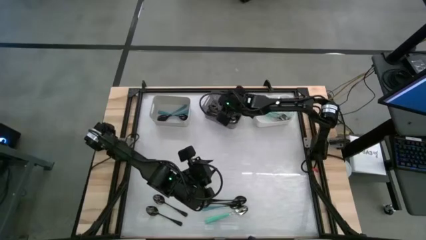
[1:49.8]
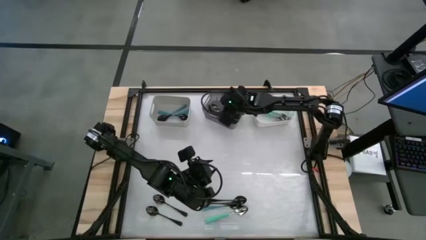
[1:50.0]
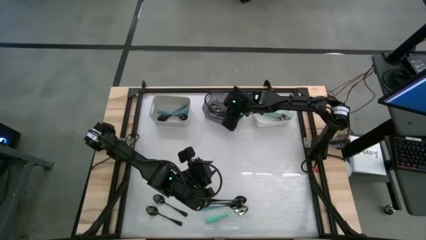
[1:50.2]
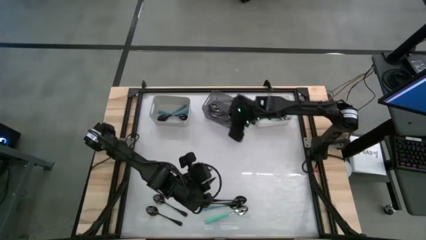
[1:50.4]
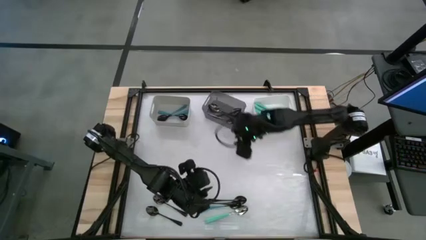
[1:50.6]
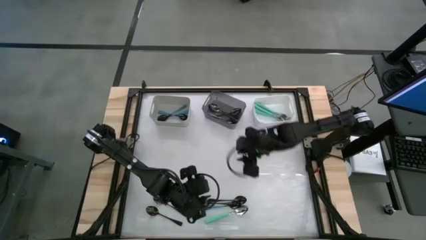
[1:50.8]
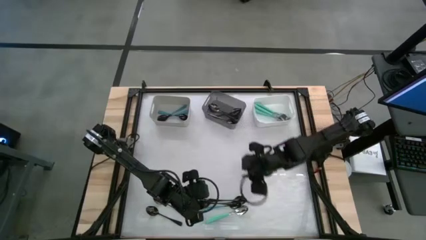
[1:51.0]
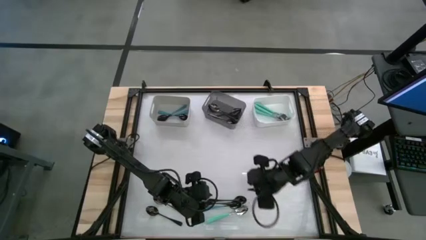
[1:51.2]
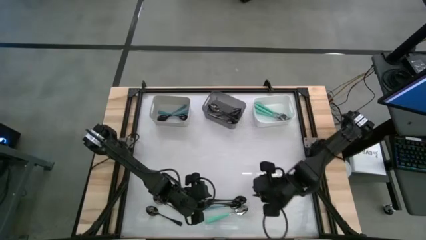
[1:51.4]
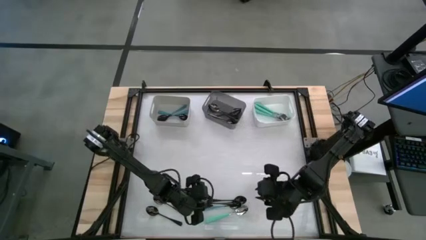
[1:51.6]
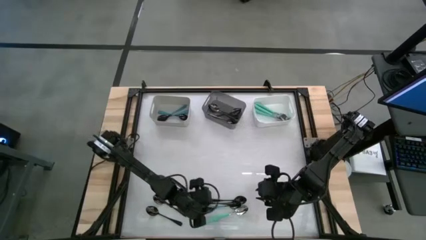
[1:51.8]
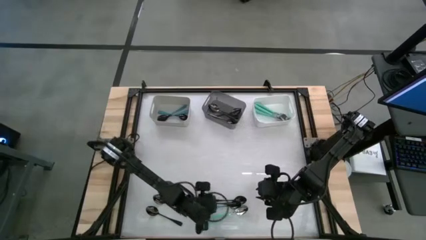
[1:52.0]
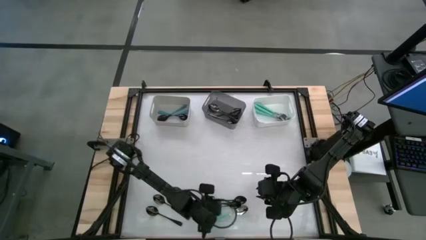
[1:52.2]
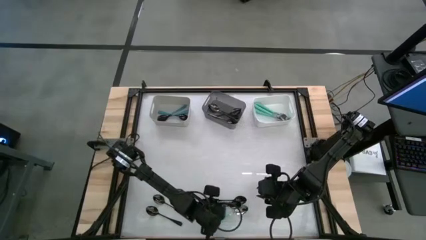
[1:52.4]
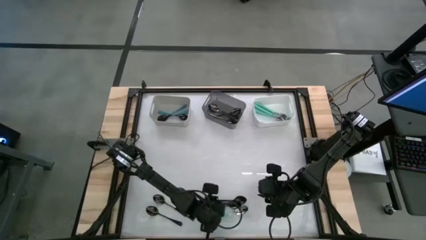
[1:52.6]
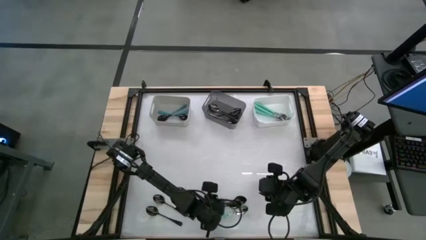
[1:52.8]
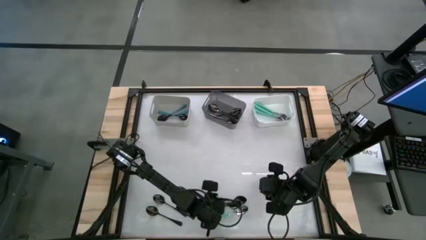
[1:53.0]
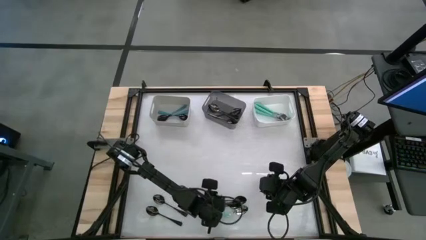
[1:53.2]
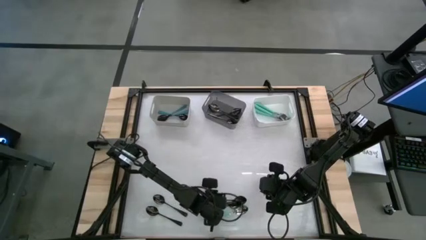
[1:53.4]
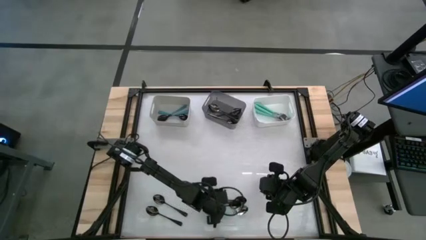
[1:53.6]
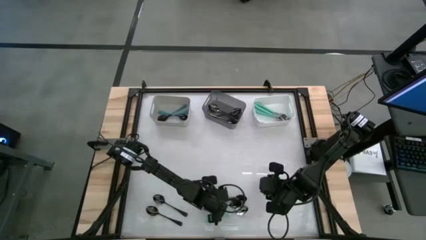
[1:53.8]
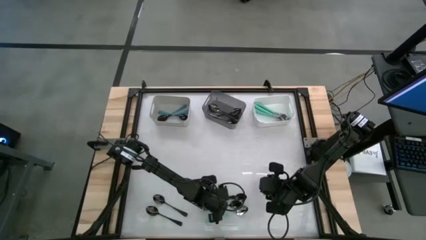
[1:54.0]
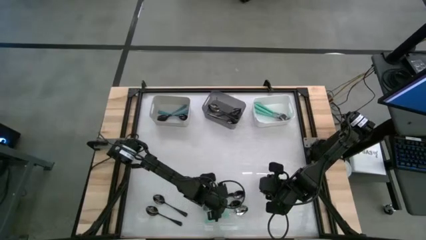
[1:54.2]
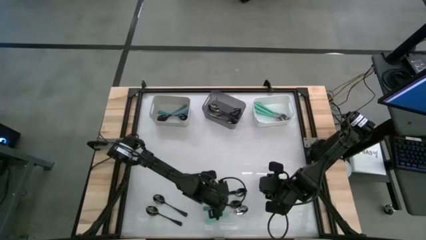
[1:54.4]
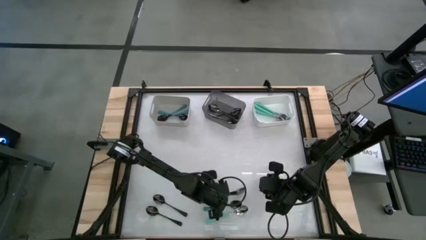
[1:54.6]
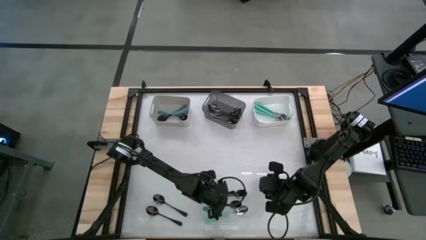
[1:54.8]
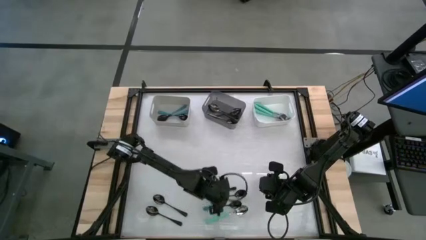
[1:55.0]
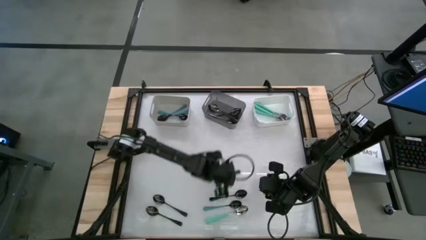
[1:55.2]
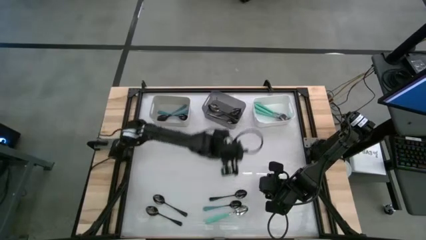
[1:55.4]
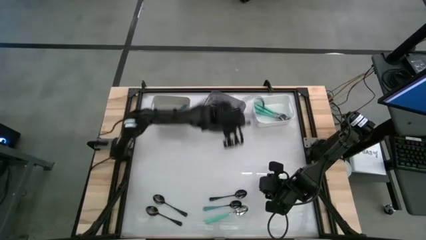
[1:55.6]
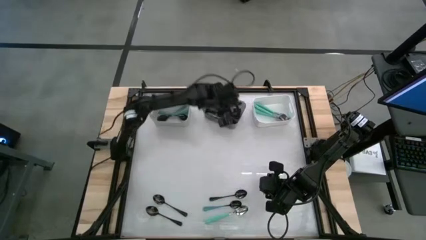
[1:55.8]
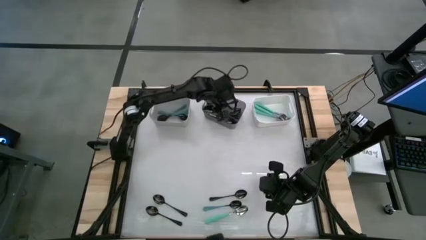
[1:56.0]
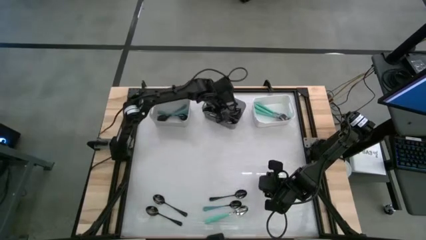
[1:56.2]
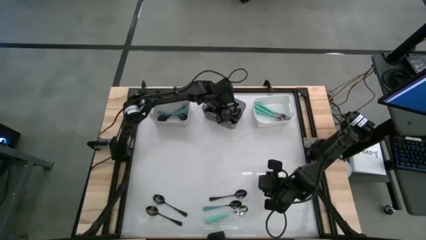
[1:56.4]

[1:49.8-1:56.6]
Task: Sort silverware by color (type)
Put the black spoon into the black bin

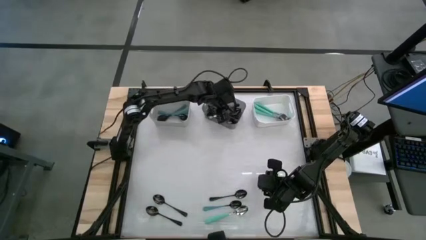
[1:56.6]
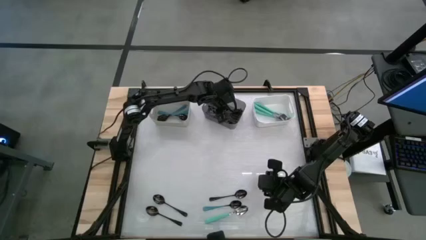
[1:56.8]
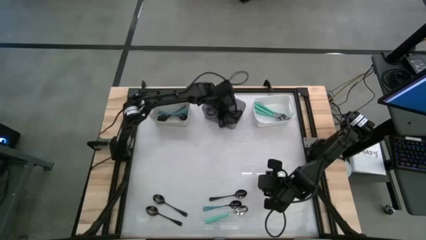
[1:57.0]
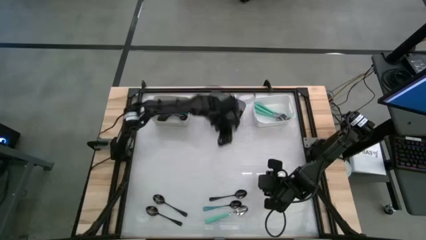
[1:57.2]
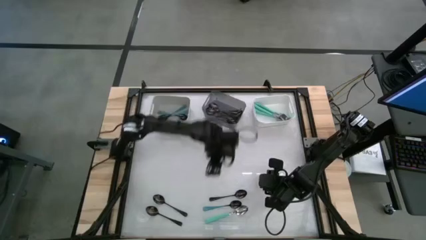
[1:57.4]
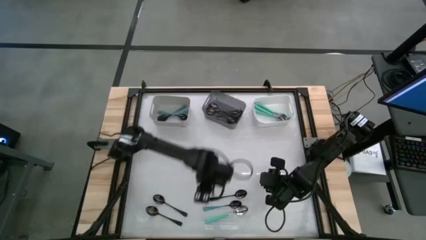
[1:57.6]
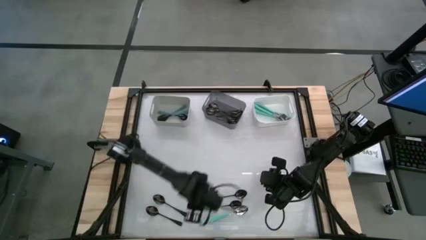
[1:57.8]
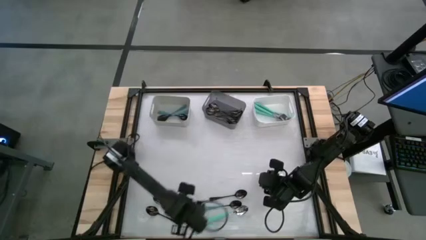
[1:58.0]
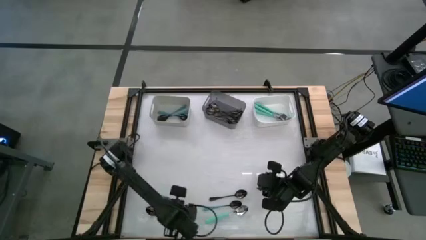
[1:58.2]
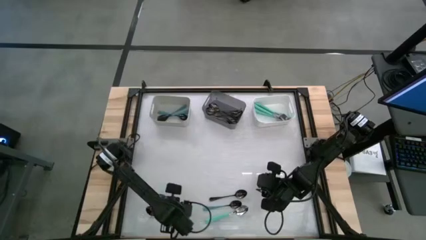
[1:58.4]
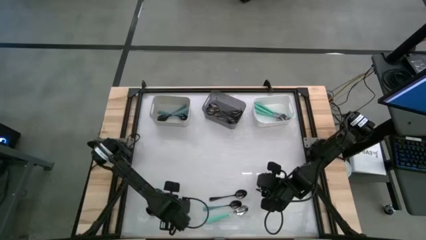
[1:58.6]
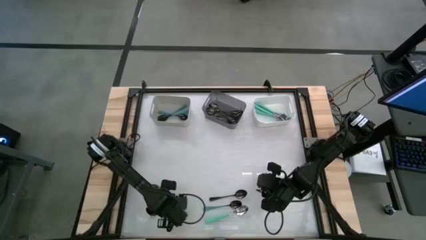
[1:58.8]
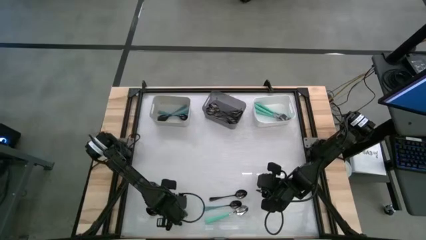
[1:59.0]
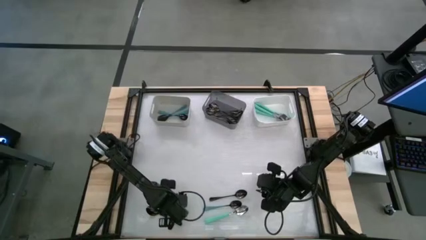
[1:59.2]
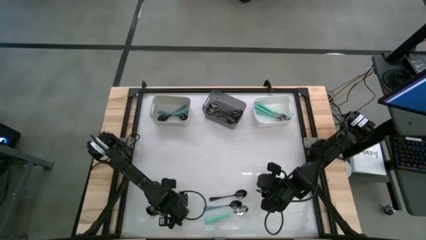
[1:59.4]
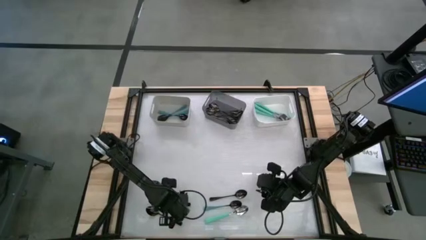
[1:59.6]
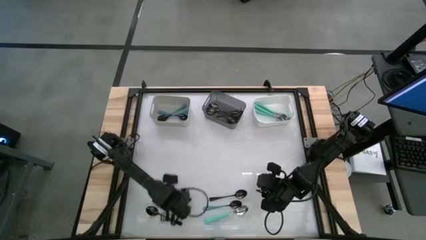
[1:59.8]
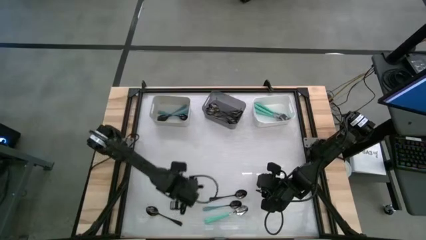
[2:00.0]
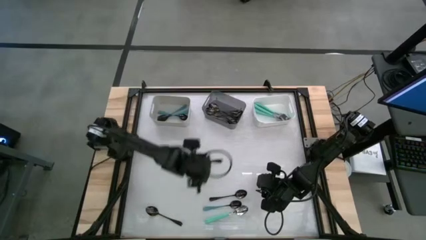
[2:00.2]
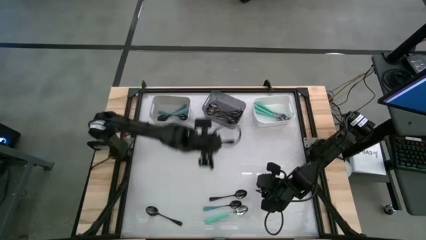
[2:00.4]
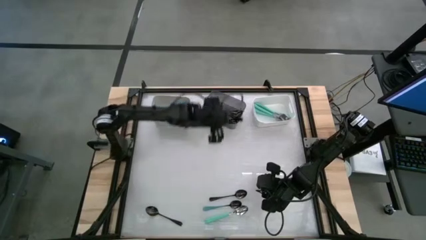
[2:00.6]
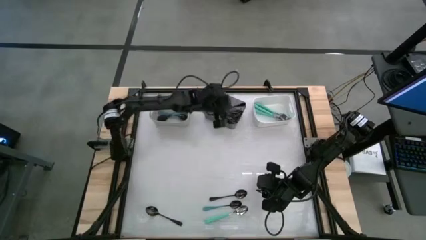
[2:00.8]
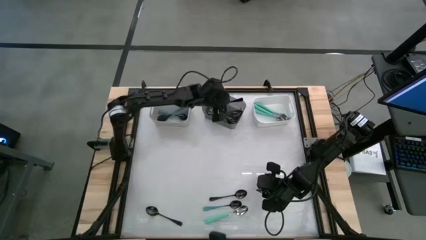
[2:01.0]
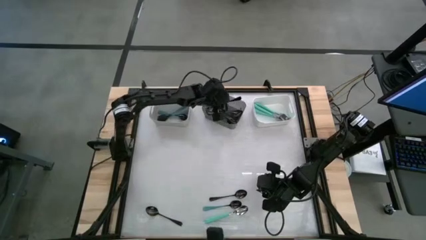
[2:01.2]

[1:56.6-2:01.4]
Put the black spoon into the black bin

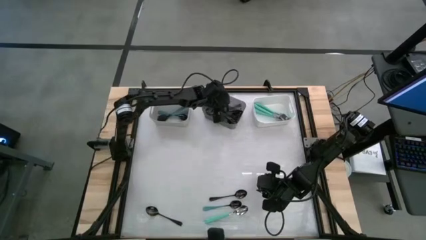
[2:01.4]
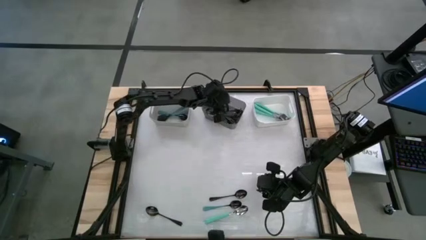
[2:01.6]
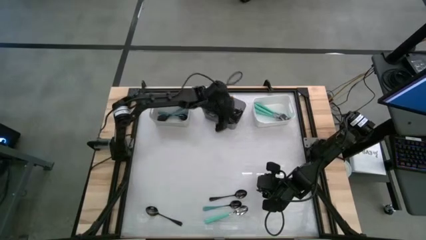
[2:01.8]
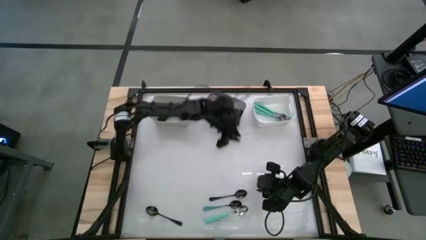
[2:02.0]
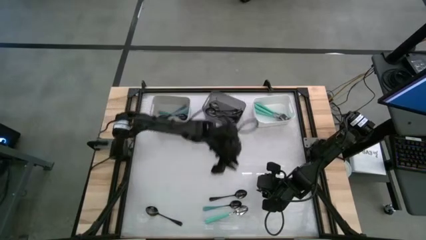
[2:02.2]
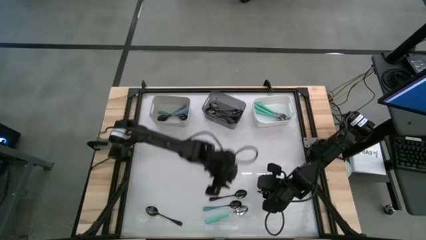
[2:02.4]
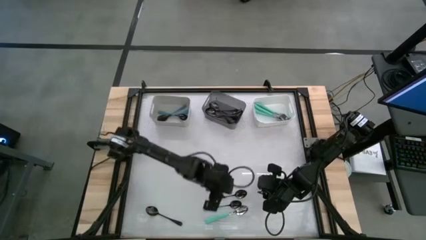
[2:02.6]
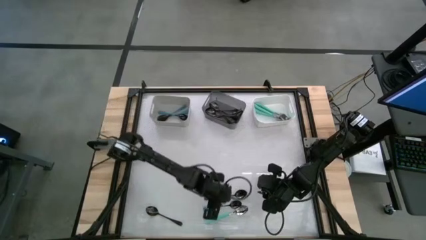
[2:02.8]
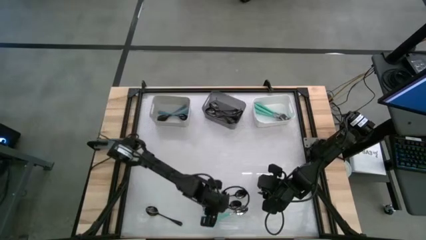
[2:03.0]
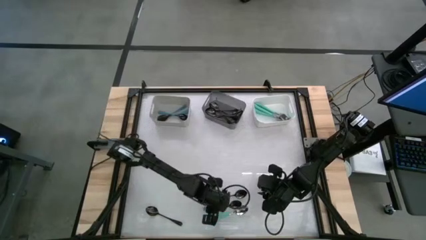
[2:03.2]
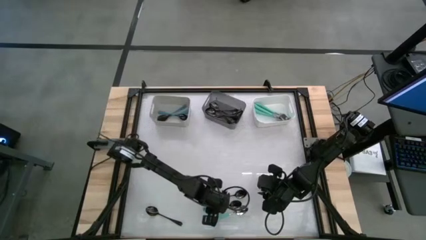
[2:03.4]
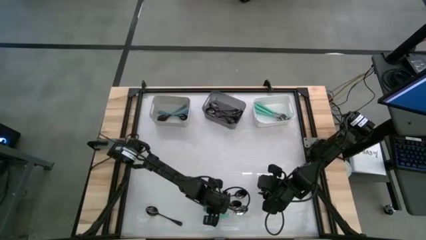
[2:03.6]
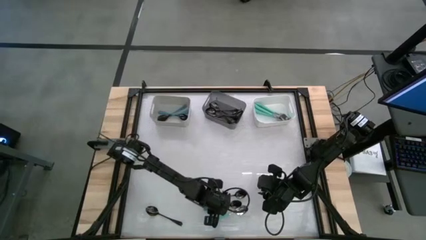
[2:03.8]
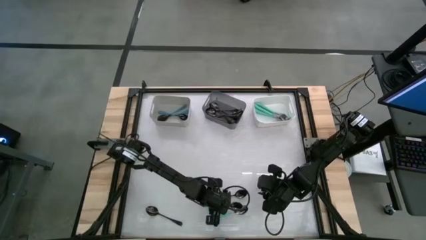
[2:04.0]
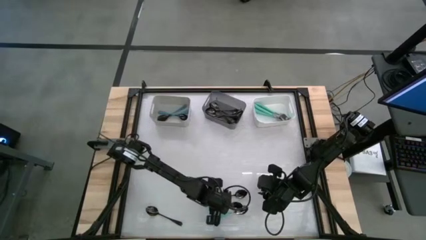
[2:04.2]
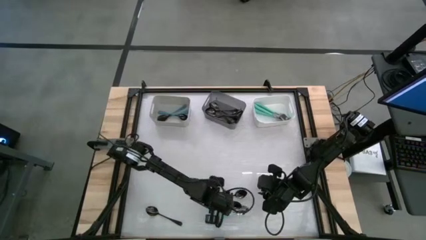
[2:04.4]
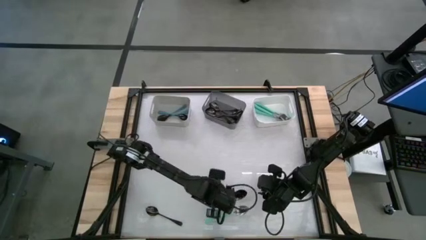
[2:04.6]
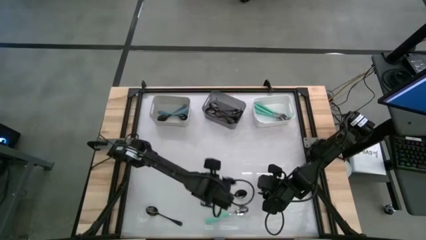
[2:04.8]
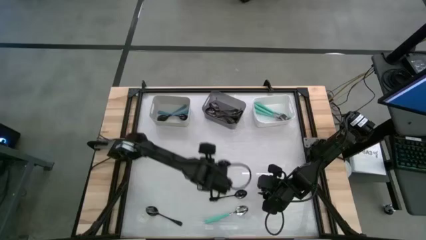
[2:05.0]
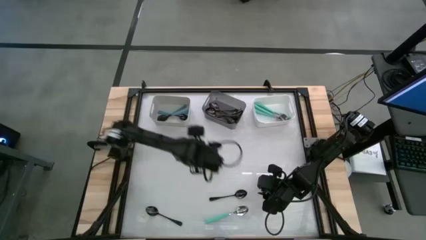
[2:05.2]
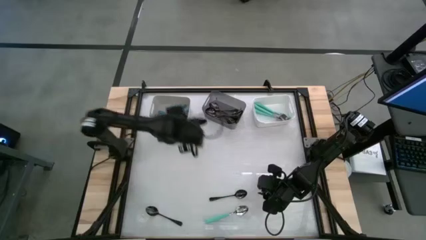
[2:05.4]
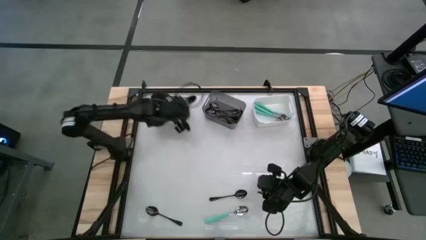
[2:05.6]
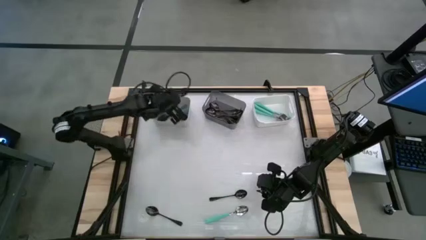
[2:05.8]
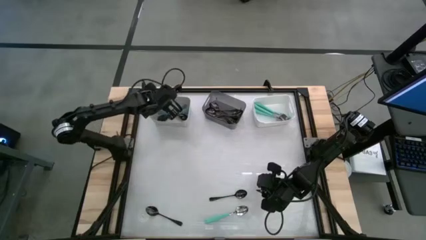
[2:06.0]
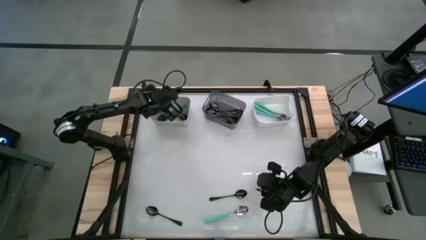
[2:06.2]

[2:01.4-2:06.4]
Put the blue spoon into the gray bin
